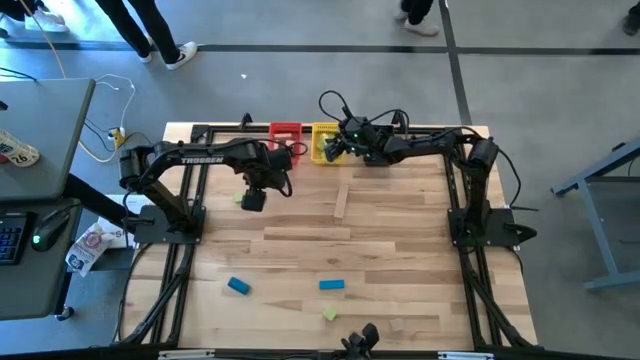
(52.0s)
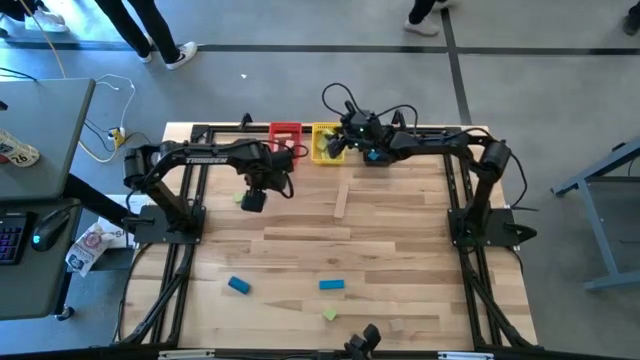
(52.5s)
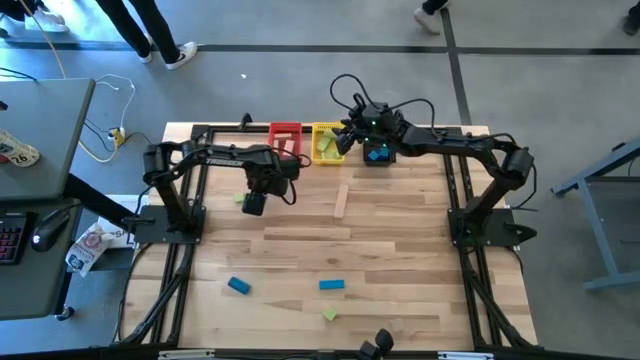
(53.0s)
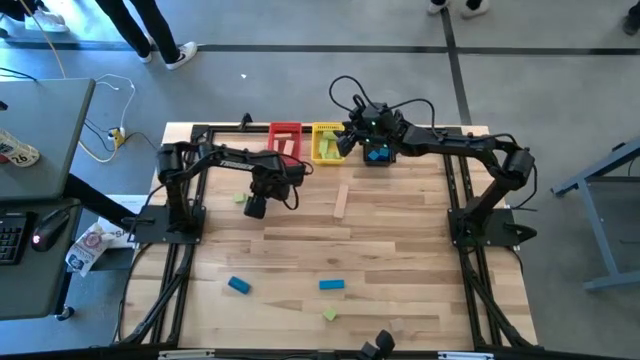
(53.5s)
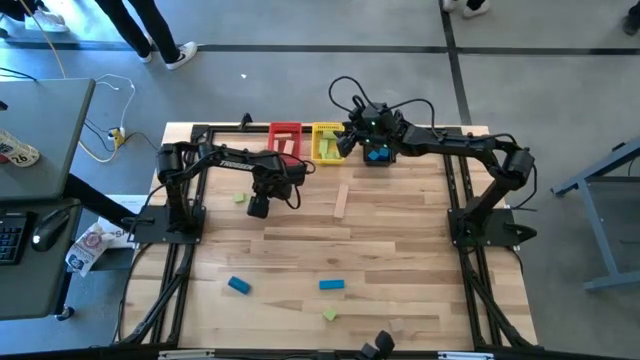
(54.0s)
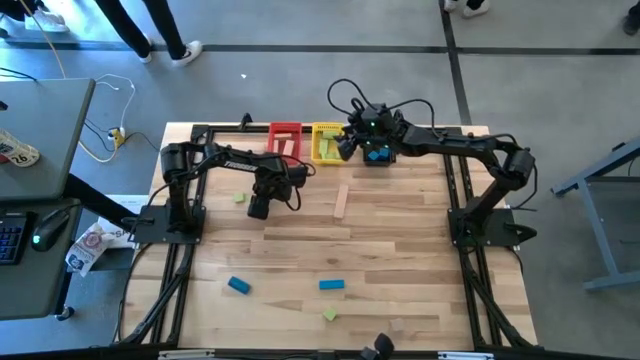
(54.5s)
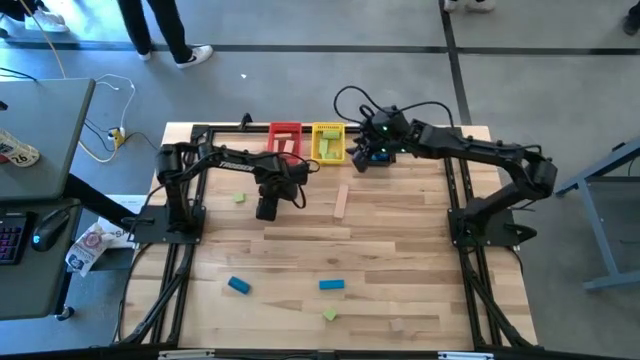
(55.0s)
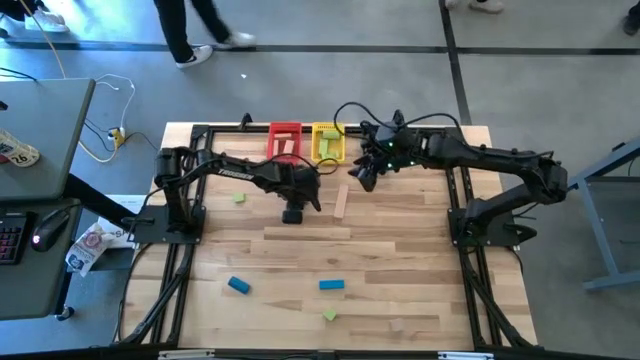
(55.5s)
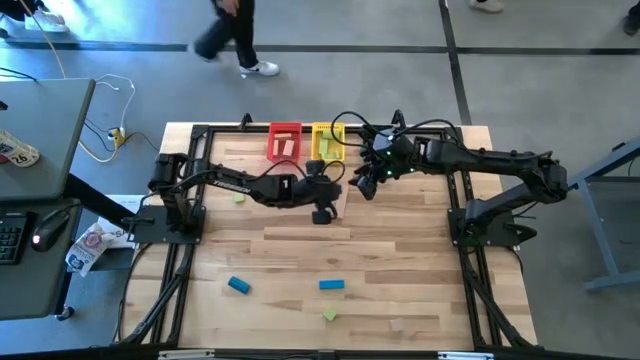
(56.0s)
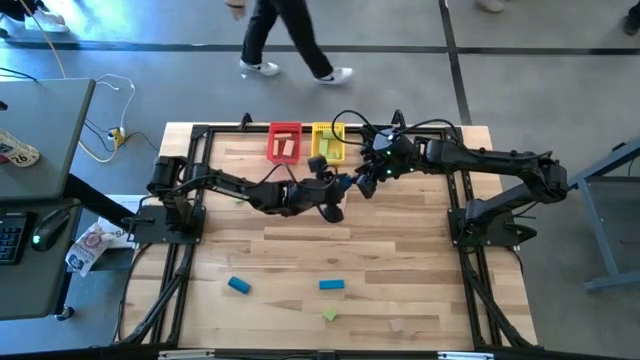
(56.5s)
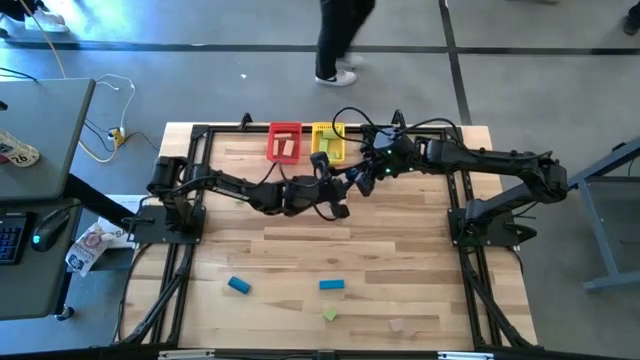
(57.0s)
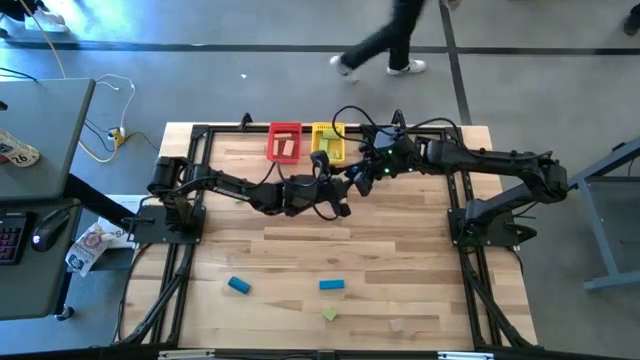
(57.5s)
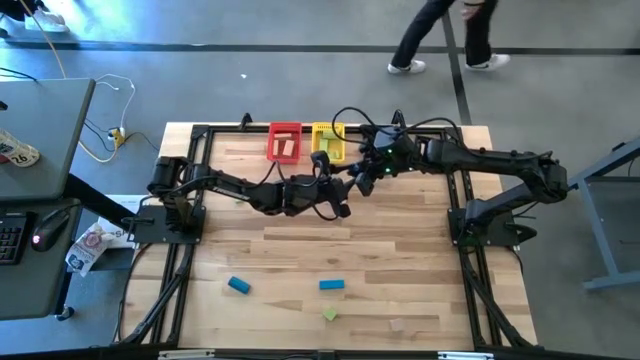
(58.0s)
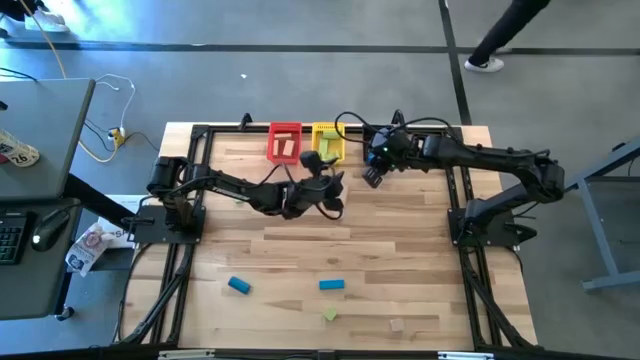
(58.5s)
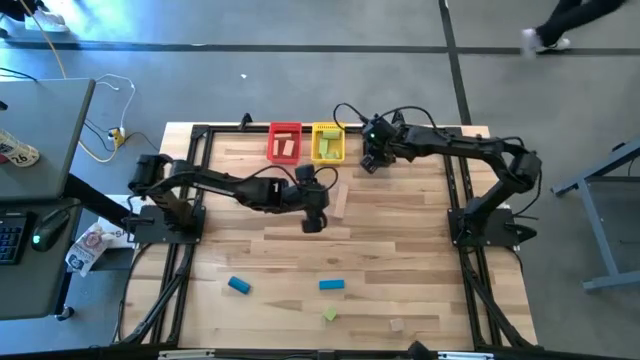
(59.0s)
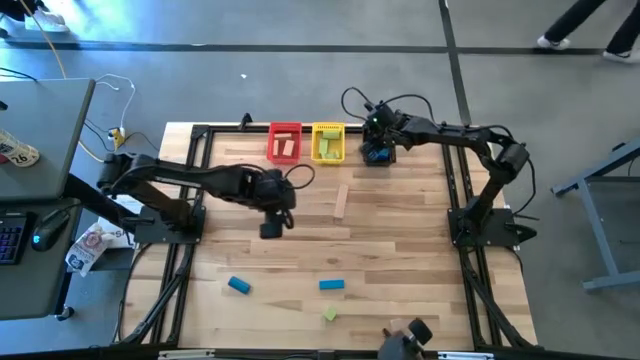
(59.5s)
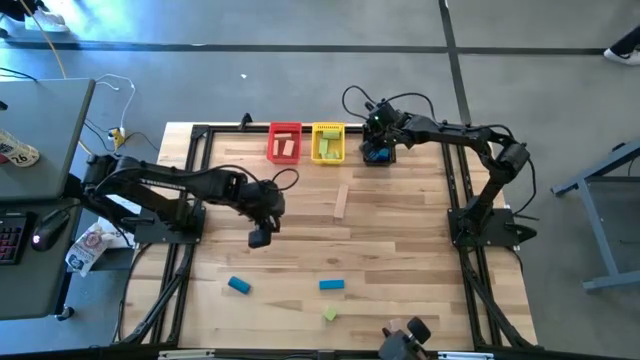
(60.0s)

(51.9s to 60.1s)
Task: Sort & place blocks by color
Put the blue block into the black basket

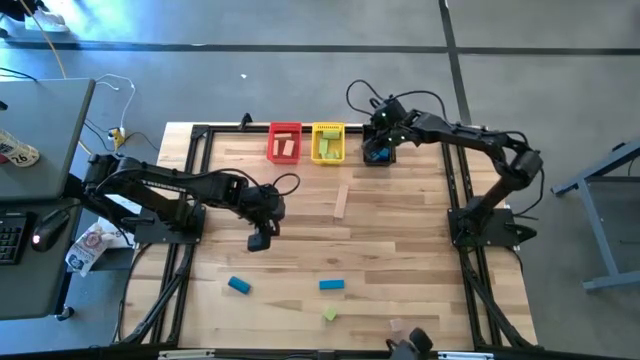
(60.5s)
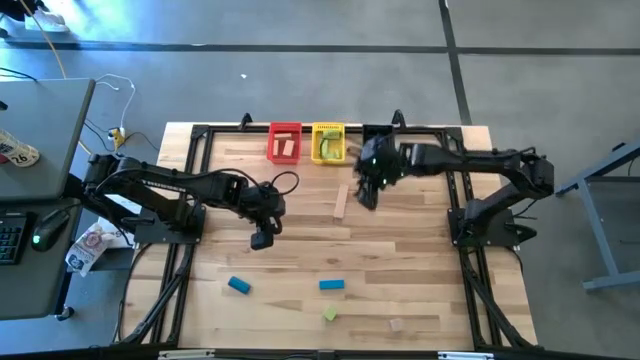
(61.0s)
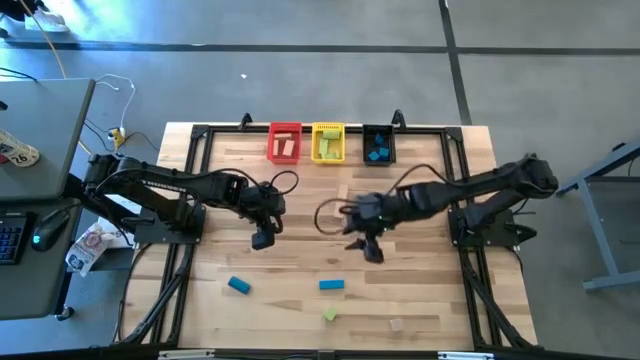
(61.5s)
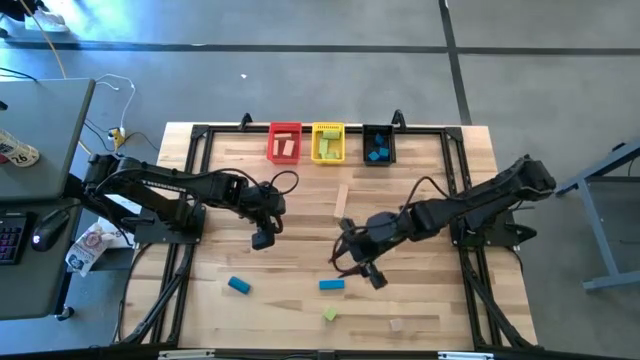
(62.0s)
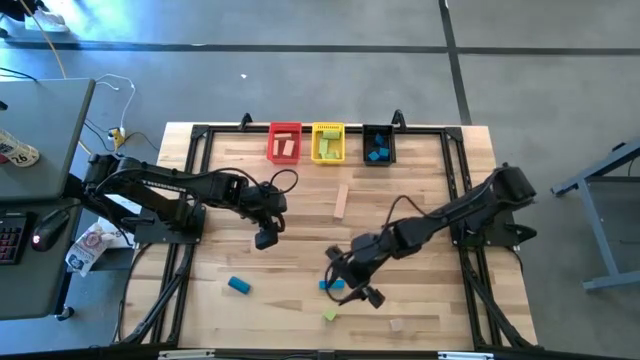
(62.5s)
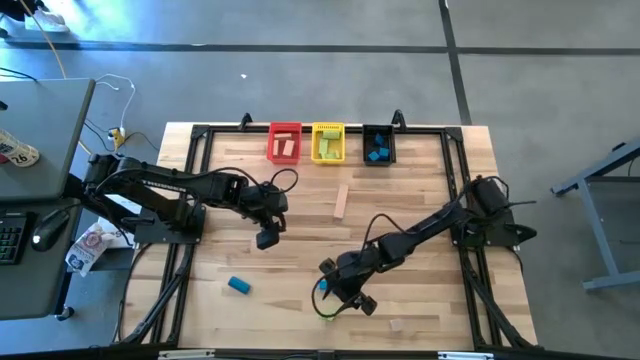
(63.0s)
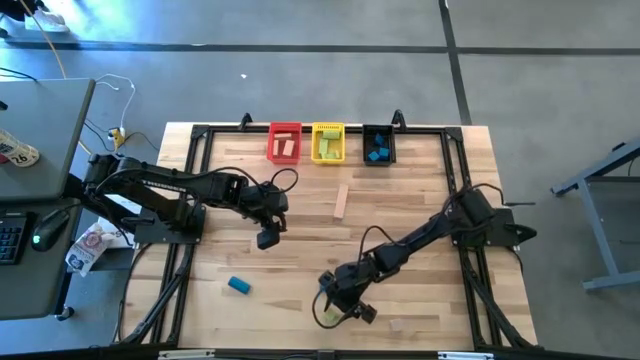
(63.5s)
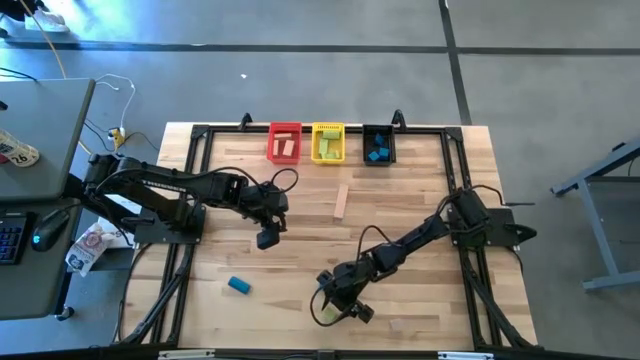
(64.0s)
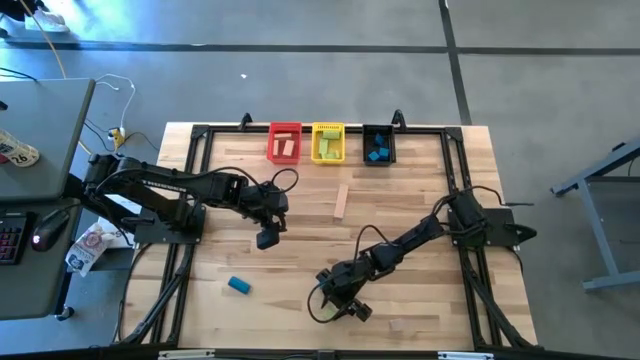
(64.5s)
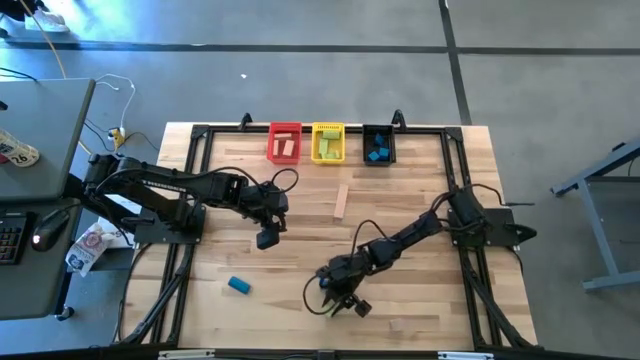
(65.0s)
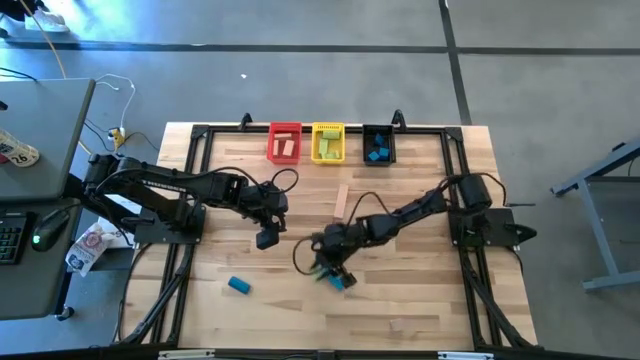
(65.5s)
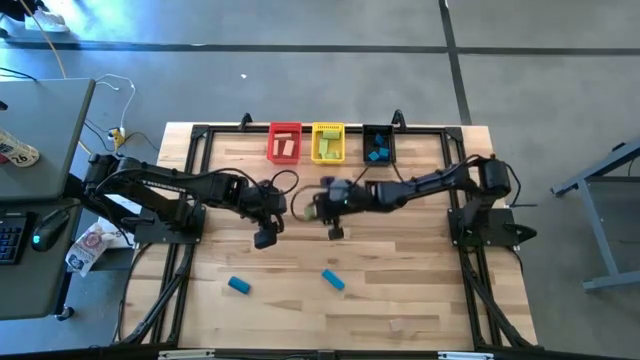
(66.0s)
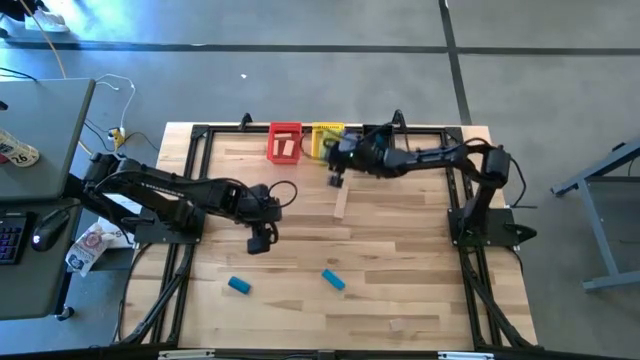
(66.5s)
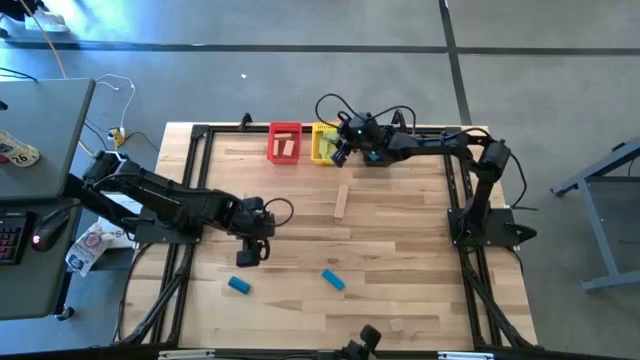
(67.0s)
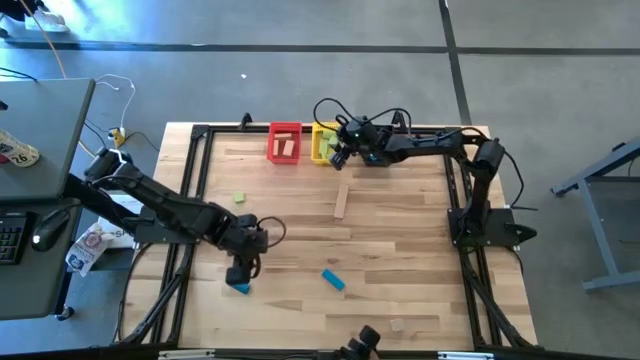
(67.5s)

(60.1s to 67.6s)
Put the green block into the yellow basket

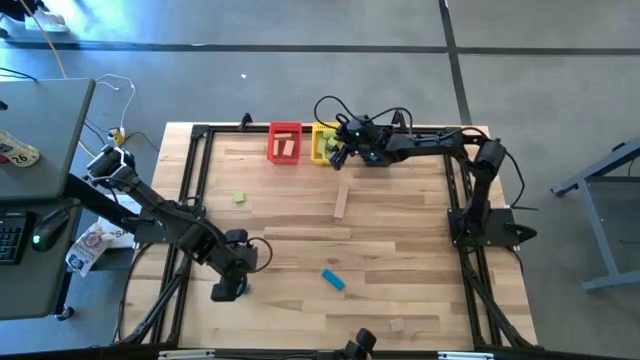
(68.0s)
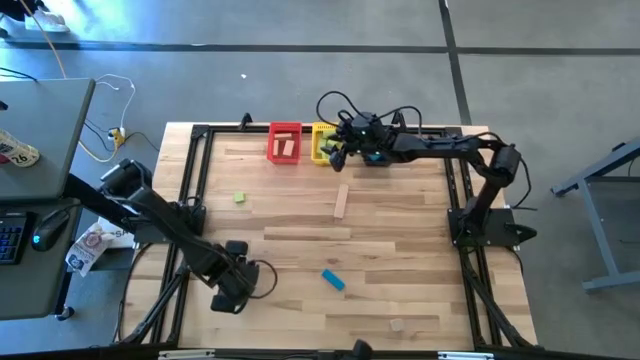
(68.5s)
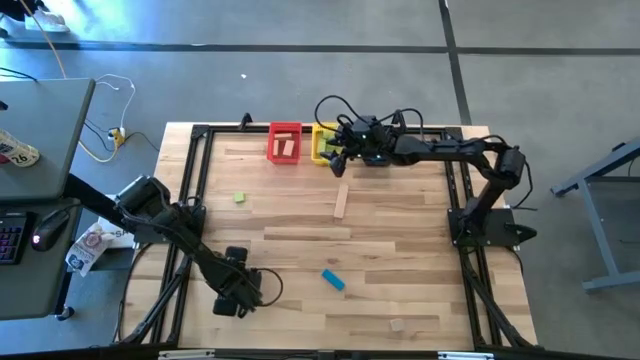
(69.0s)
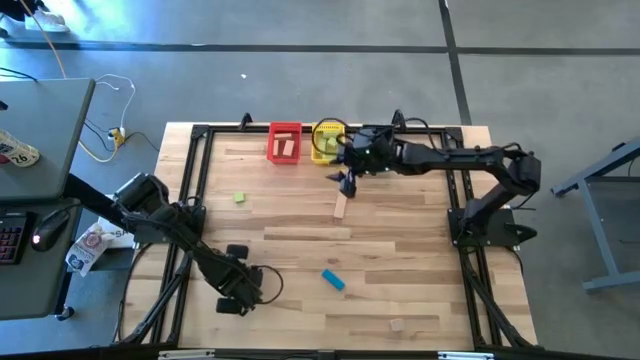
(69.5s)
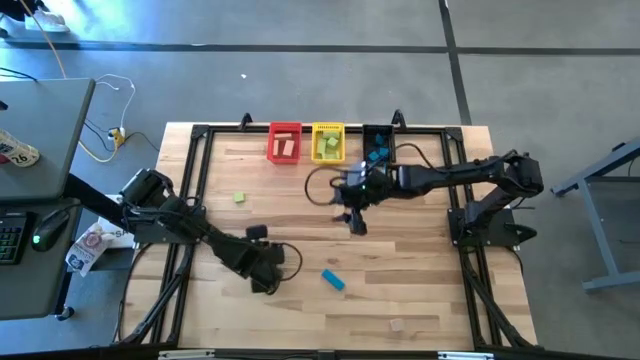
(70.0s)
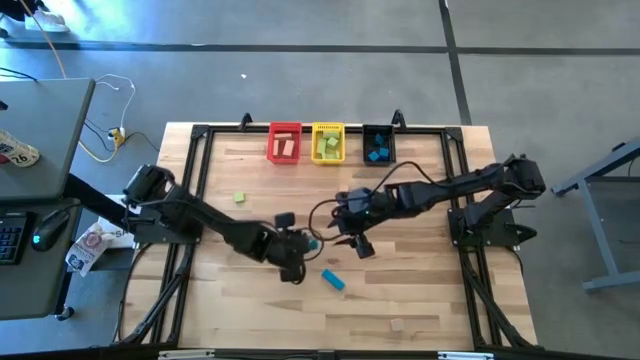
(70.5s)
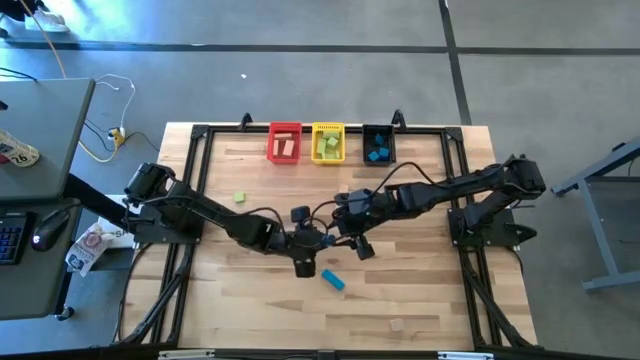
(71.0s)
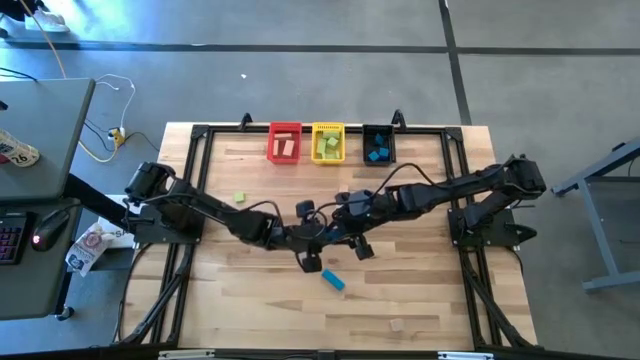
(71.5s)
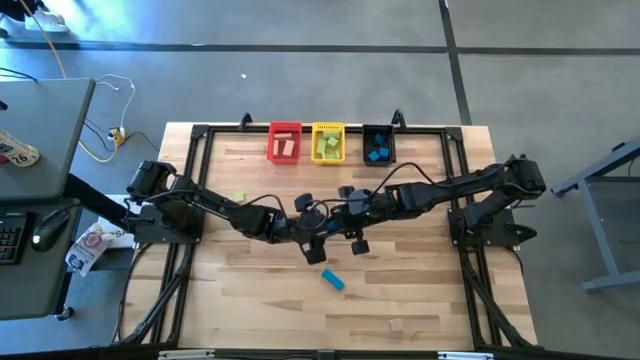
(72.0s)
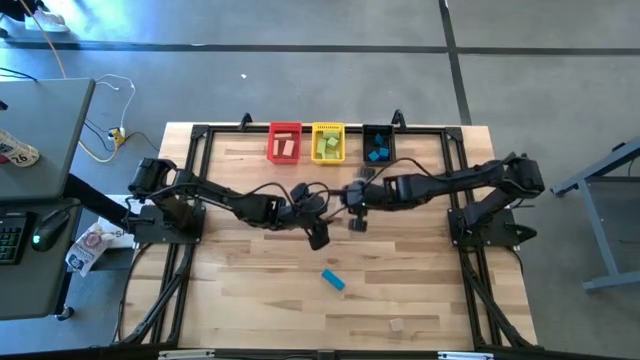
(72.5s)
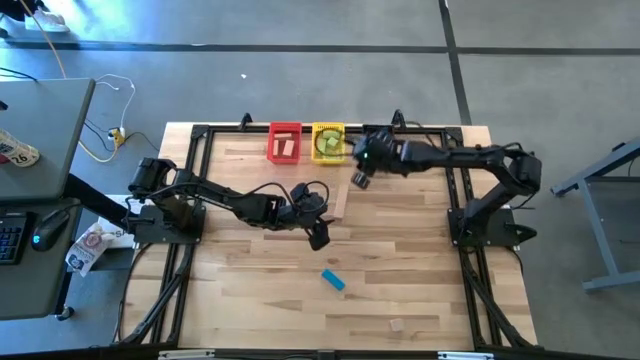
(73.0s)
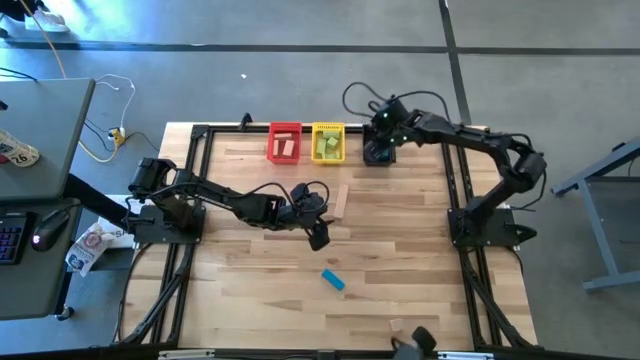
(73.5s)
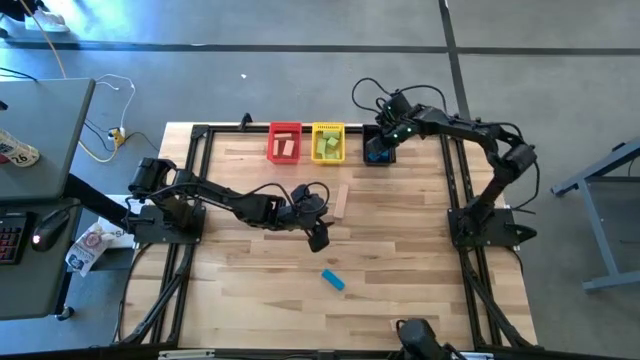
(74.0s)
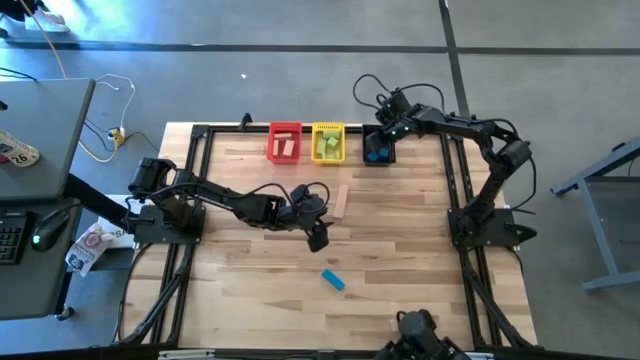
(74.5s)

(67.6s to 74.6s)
Put the blue block into the black basket
